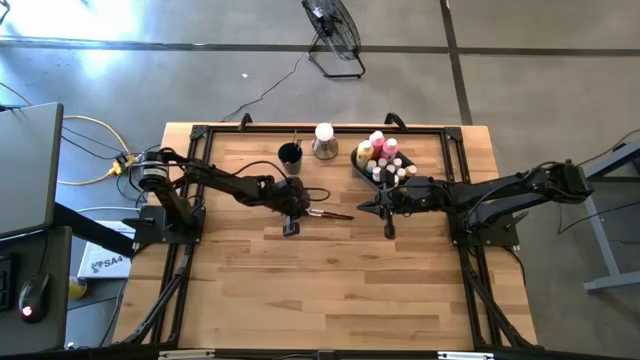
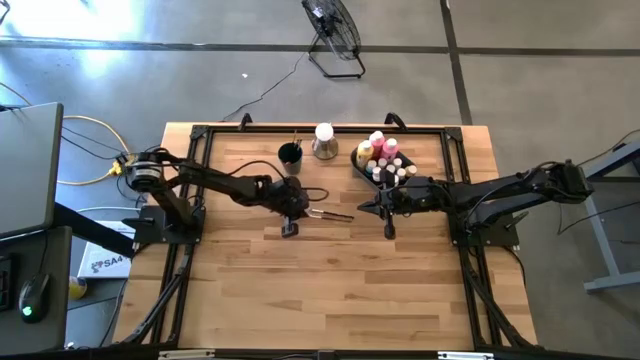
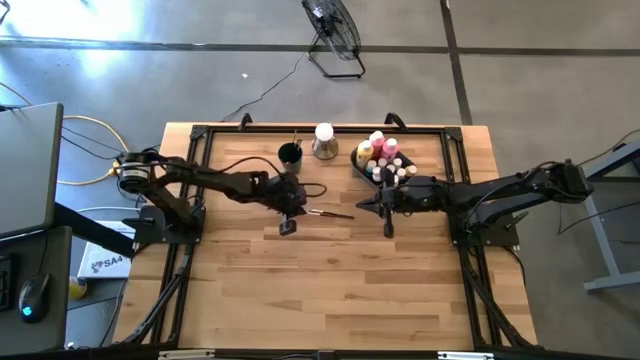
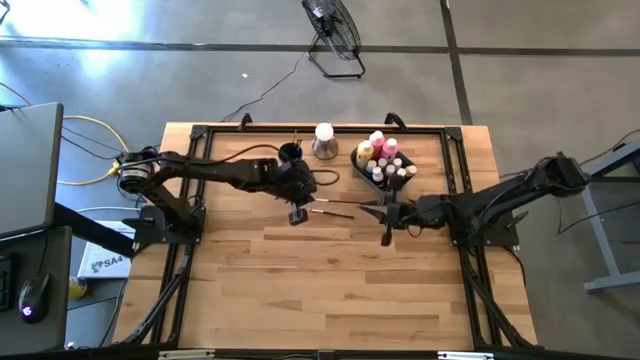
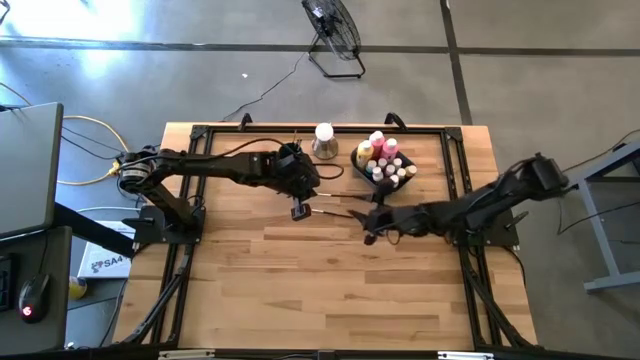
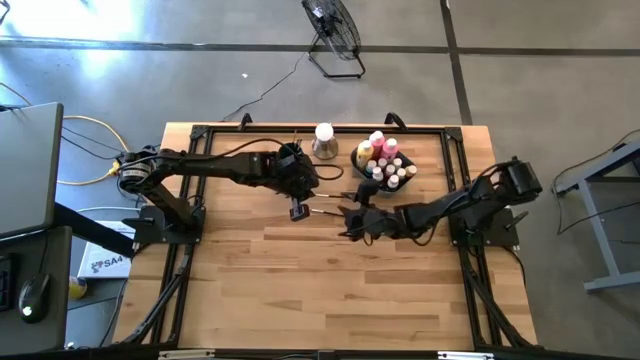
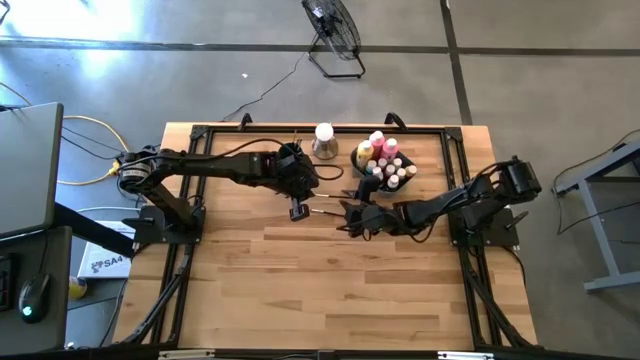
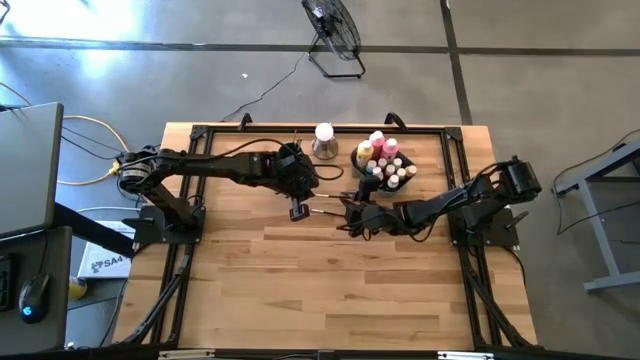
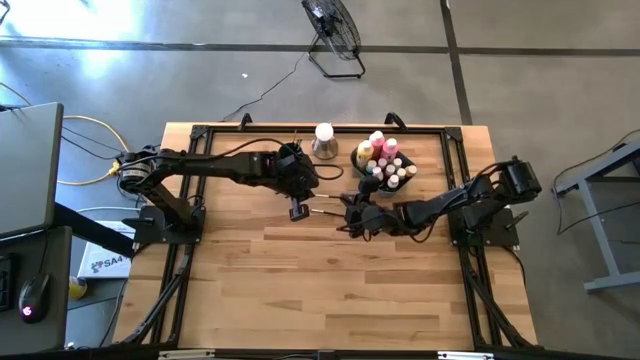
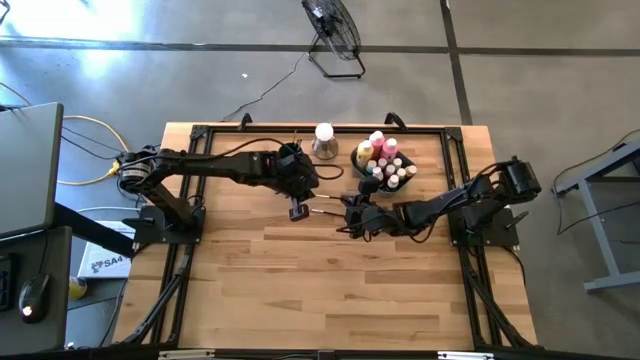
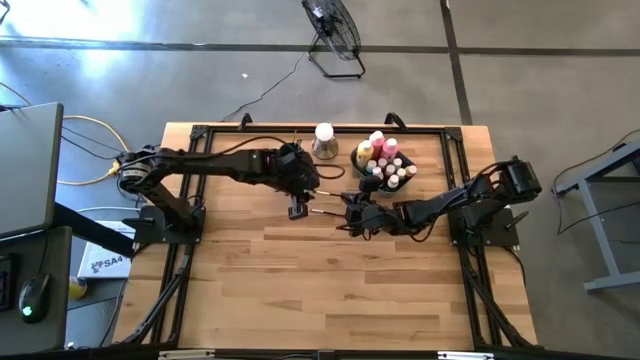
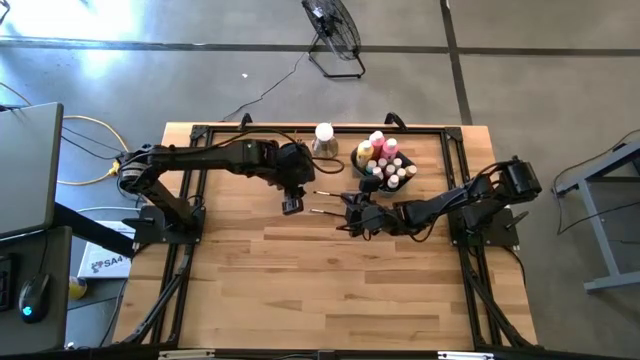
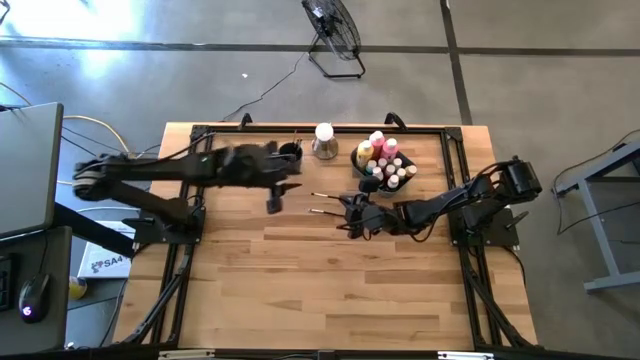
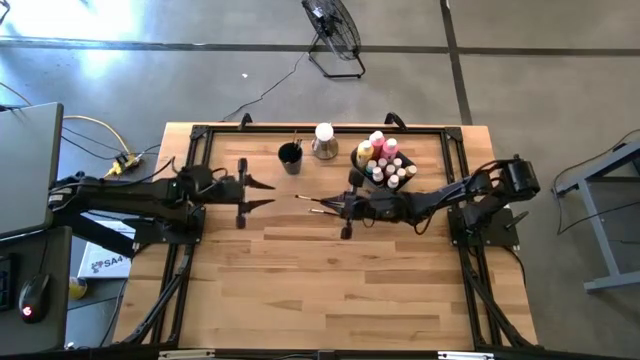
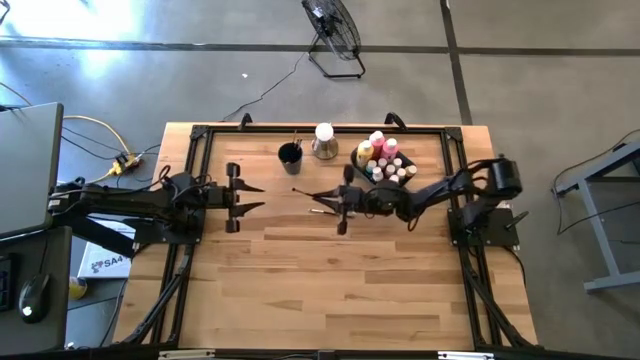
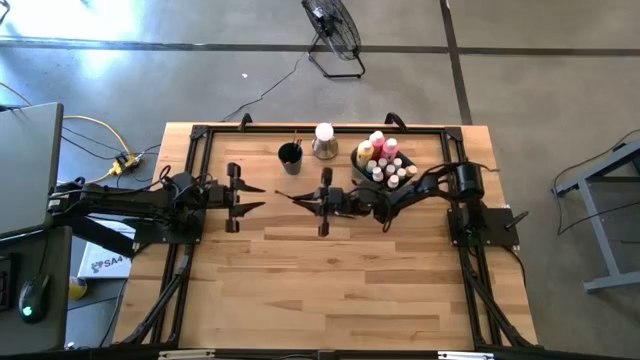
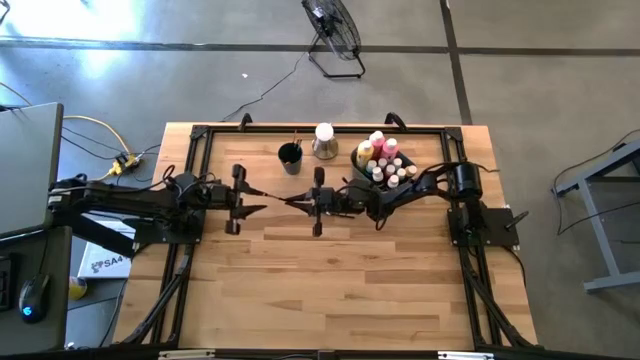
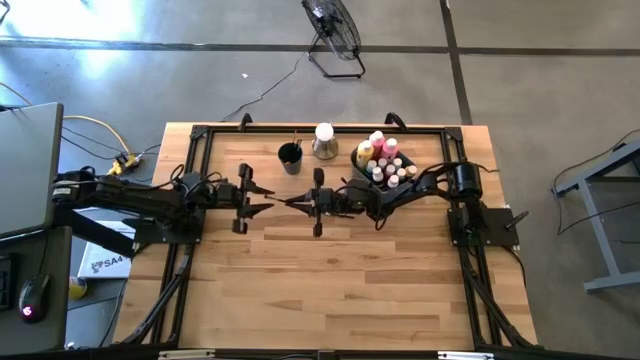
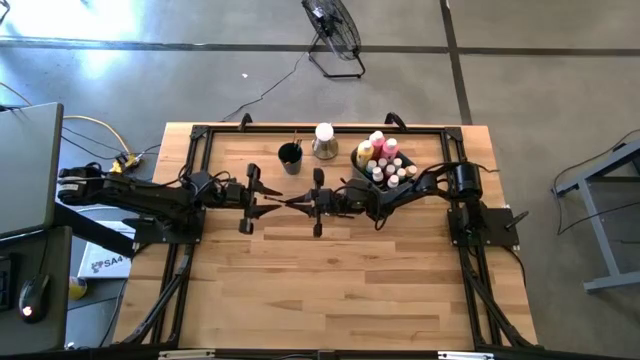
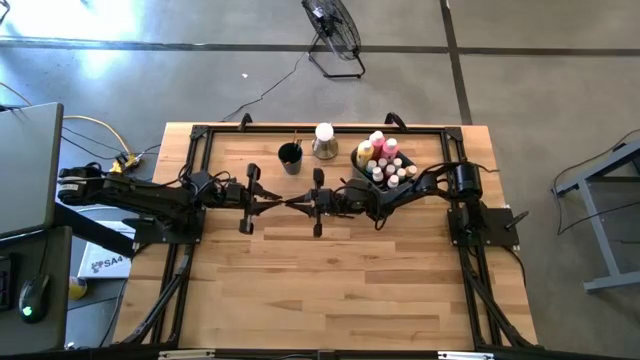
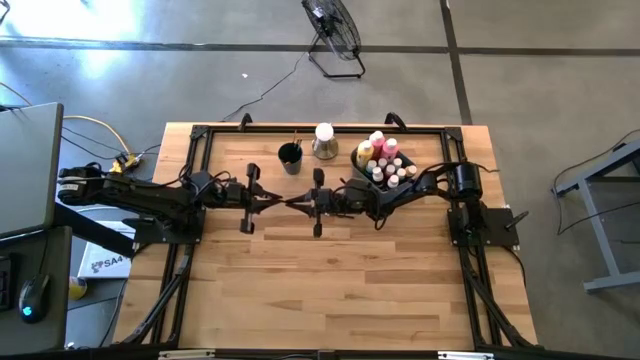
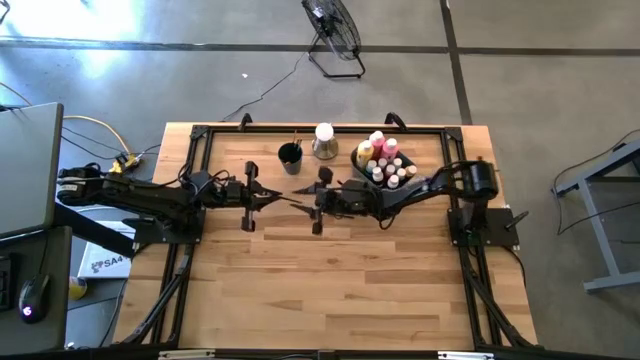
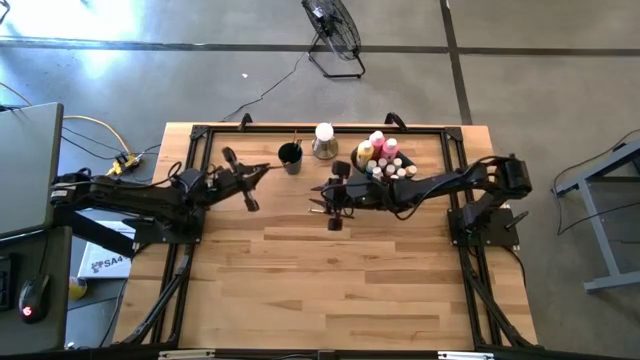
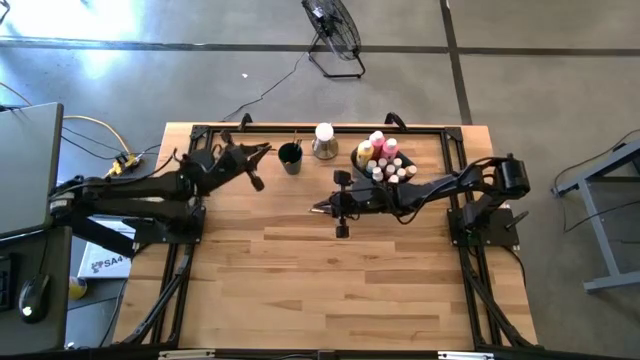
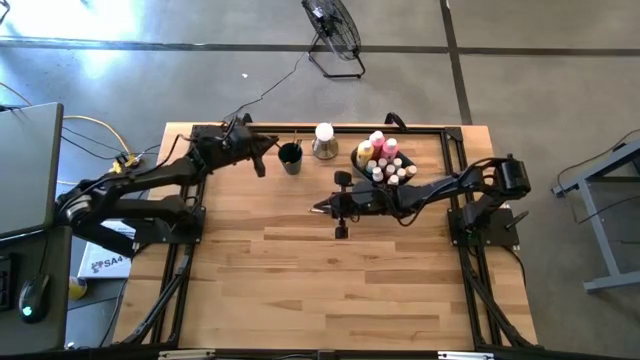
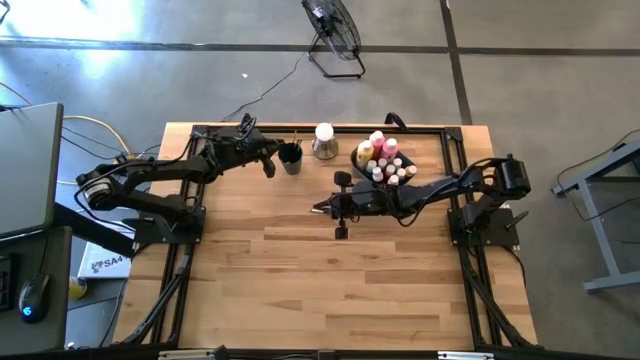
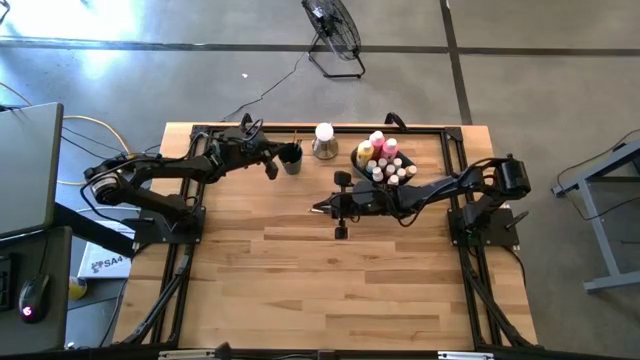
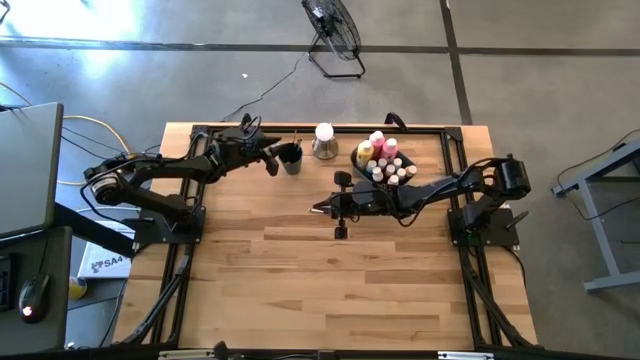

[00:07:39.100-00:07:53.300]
Task: Pick & Place Paint Supplies
Put the silver paintbrush into the blue cup
